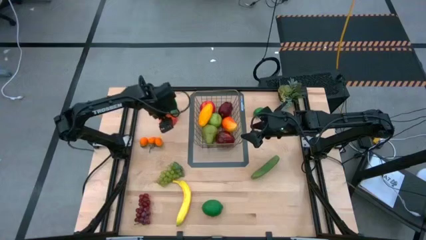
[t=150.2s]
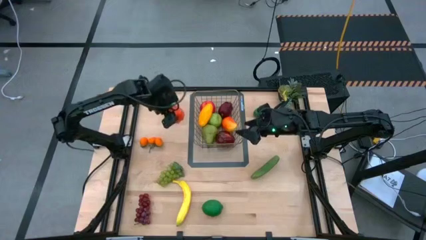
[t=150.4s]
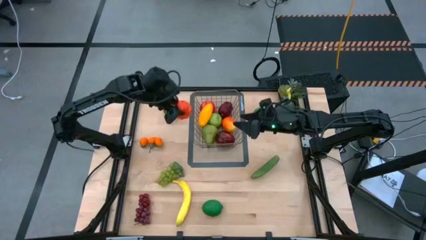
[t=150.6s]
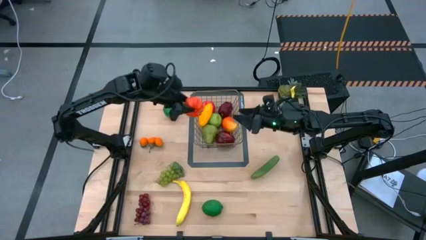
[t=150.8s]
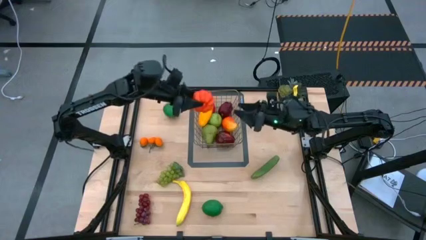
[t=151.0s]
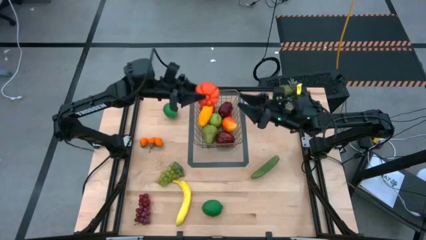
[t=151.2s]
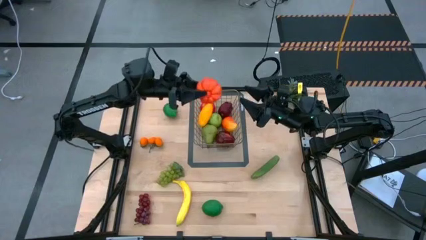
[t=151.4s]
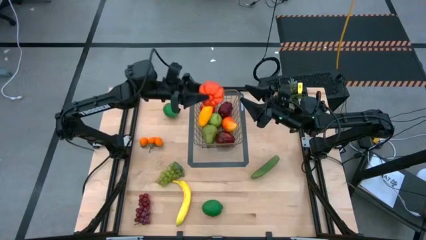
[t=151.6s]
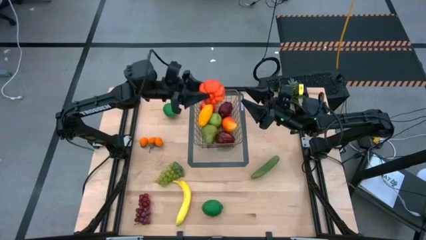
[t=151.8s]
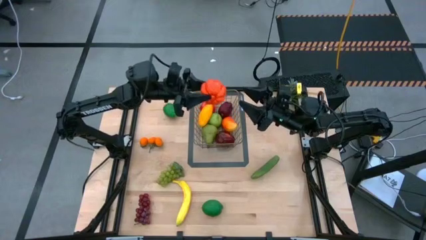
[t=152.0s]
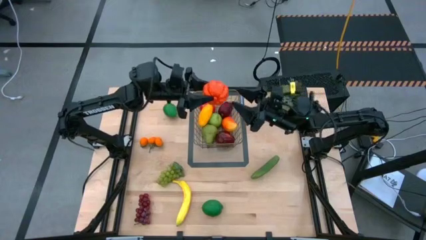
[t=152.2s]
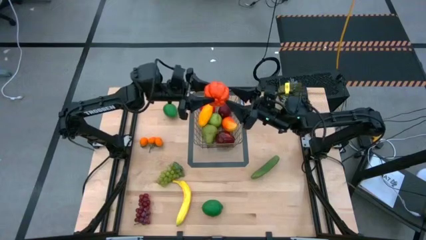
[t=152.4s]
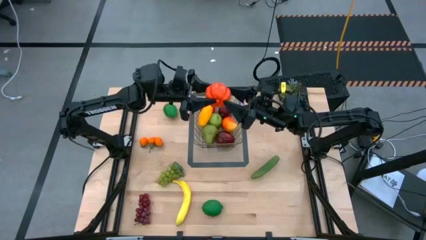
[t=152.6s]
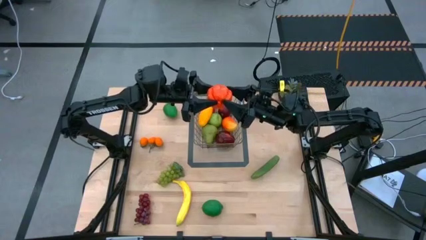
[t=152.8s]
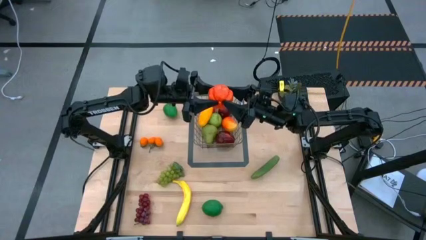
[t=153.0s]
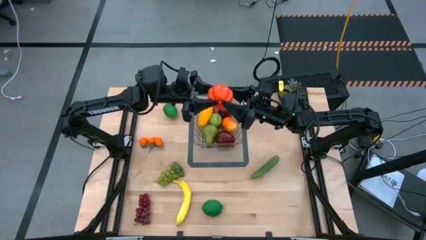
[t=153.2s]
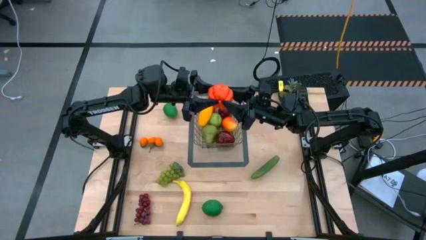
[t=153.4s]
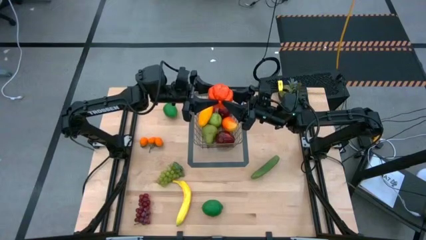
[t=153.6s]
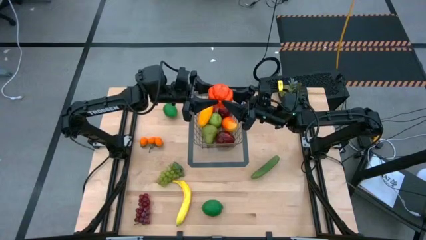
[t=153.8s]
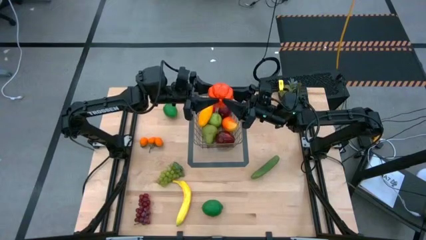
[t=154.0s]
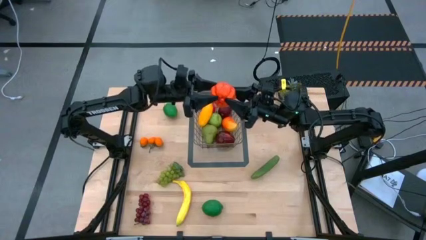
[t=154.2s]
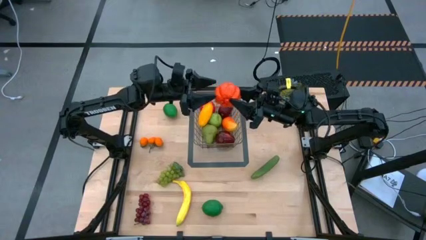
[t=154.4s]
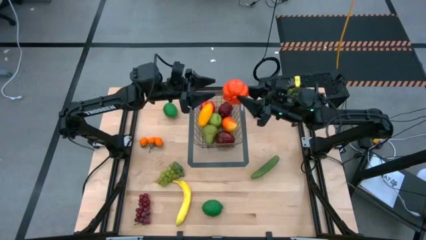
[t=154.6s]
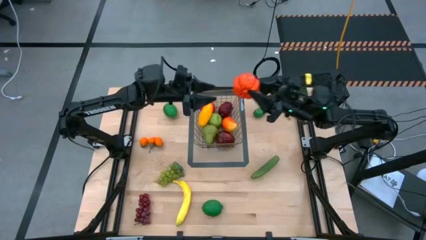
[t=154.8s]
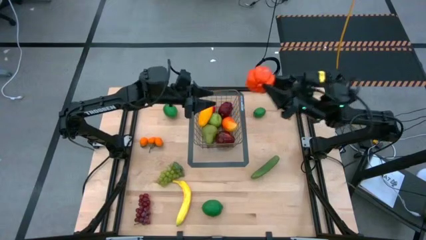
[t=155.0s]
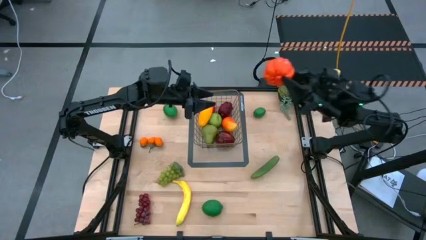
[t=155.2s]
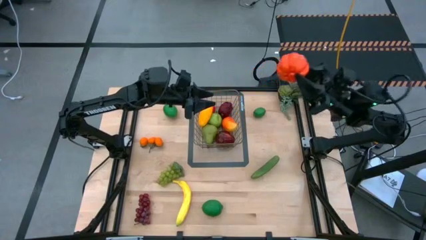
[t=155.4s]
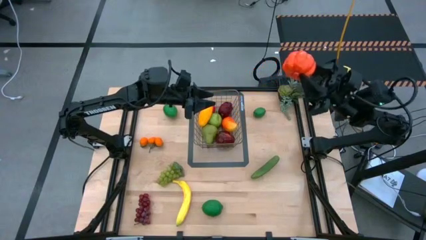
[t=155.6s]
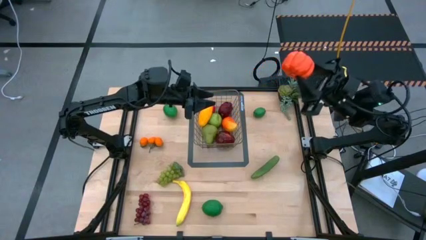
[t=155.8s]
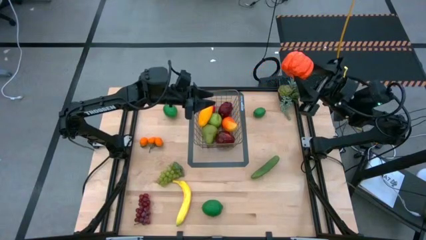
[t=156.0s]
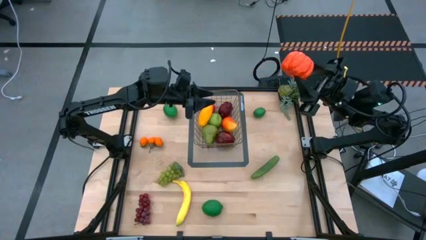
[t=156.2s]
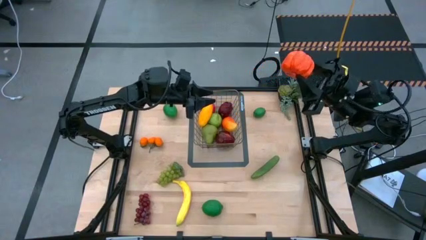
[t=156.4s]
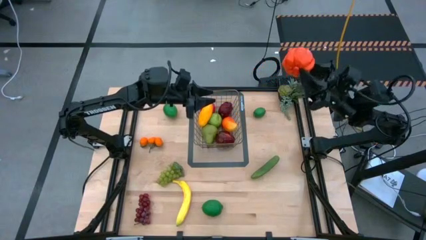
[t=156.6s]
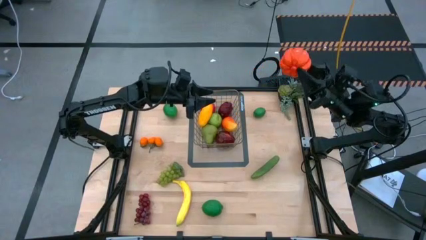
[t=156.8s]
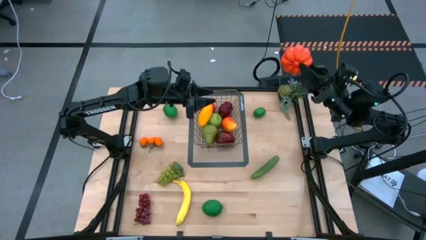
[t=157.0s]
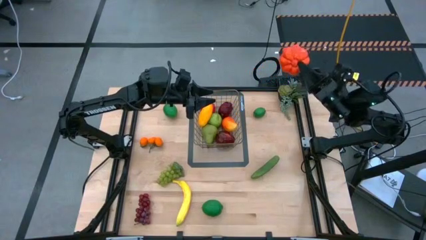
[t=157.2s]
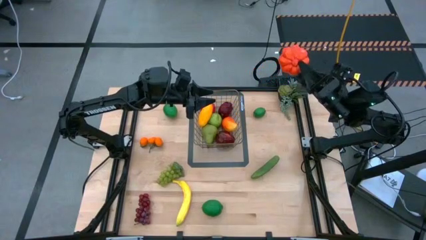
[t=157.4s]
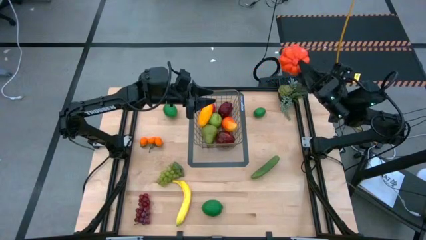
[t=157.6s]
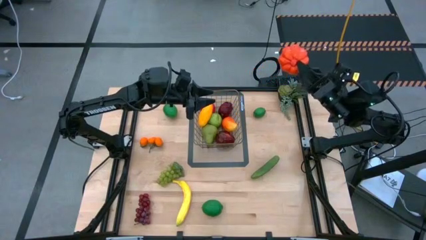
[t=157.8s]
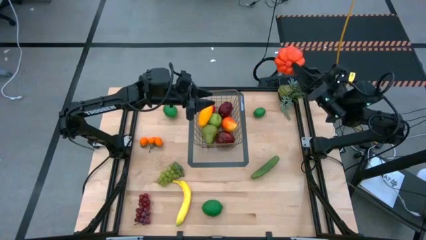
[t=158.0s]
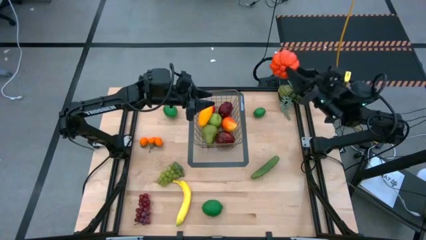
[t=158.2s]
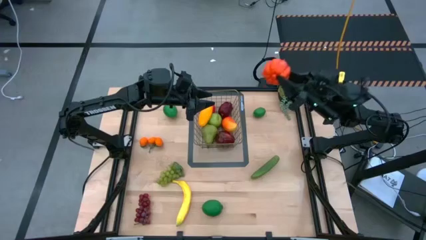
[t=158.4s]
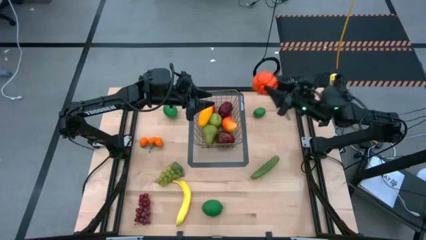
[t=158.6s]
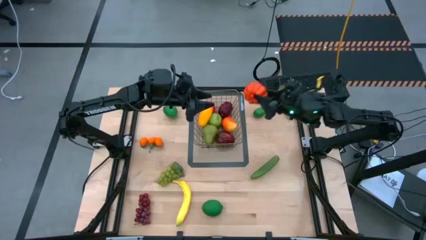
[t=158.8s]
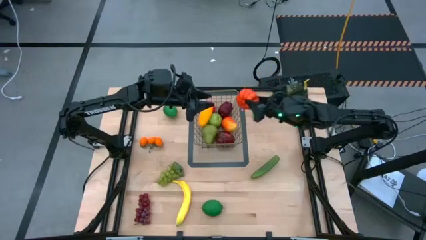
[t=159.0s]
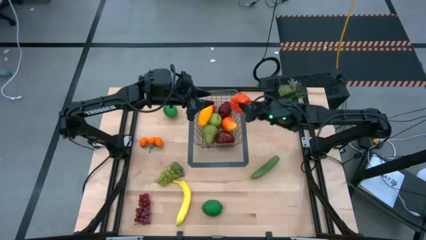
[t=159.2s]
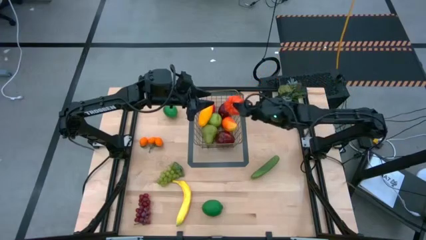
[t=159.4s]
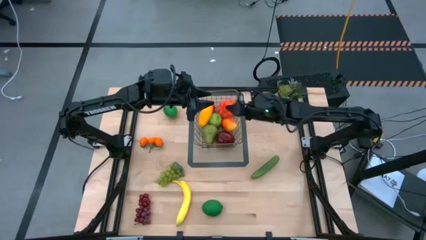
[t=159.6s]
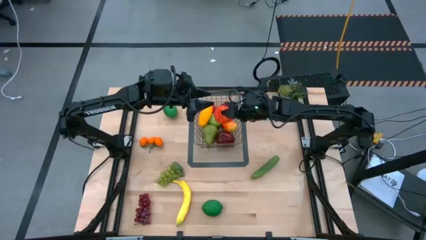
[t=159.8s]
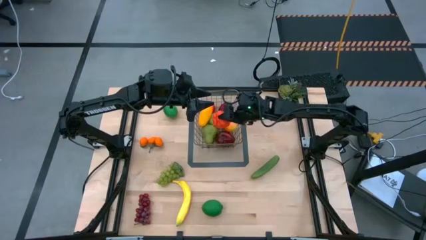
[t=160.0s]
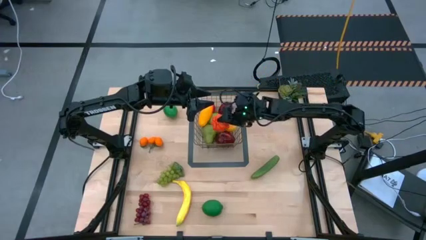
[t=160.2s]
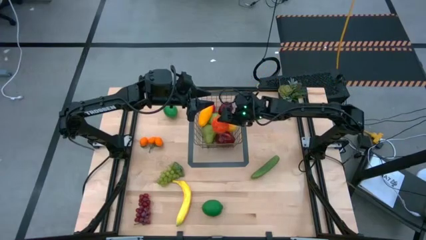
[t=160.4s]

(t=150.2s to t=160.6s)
Task: Build produce basket
Put the orange pumpkin into the gold wire basket

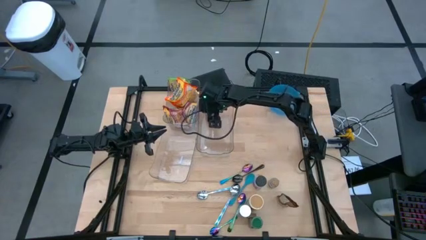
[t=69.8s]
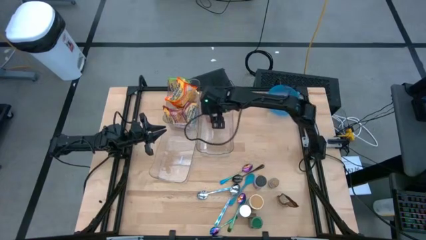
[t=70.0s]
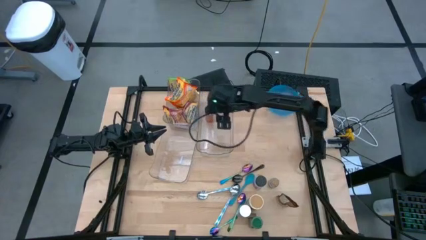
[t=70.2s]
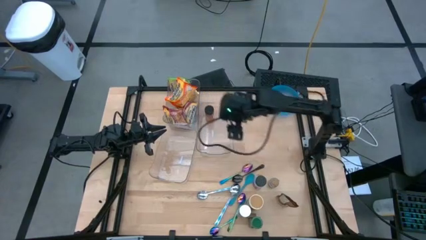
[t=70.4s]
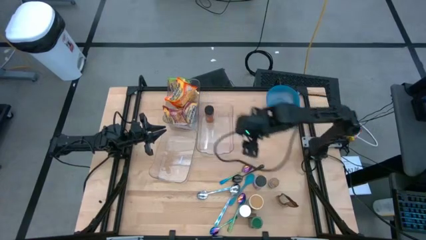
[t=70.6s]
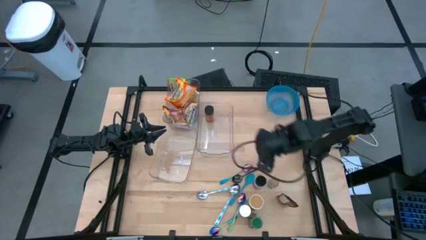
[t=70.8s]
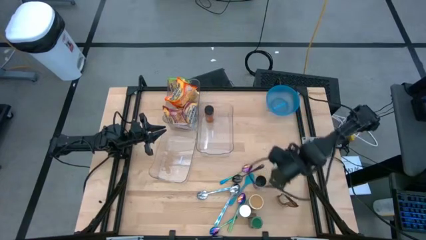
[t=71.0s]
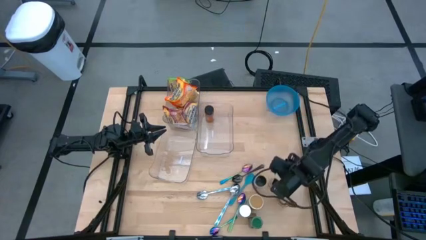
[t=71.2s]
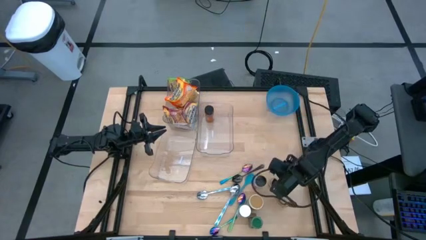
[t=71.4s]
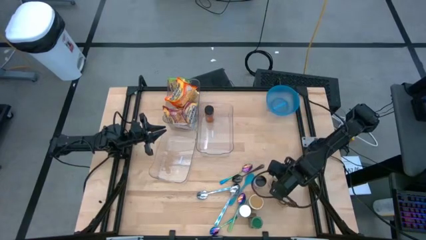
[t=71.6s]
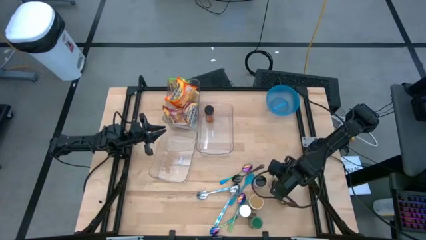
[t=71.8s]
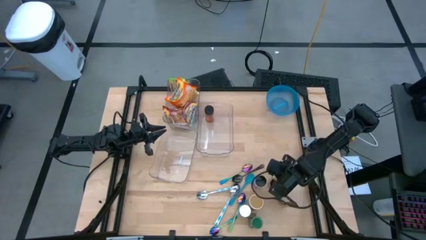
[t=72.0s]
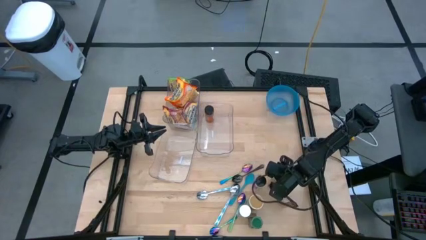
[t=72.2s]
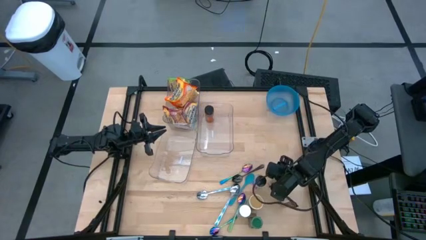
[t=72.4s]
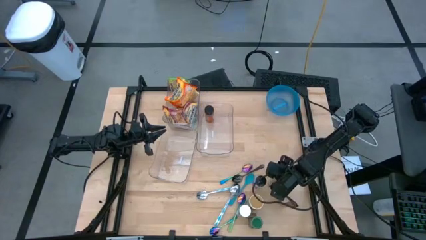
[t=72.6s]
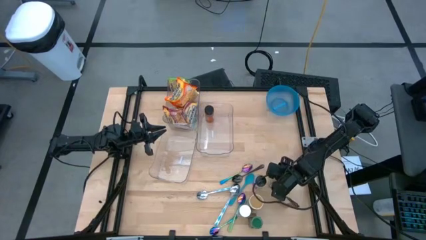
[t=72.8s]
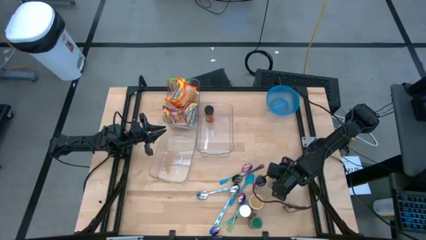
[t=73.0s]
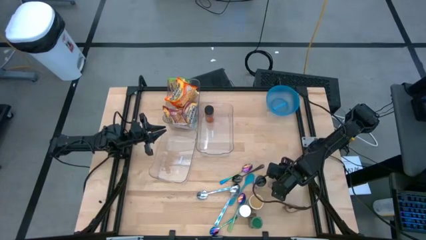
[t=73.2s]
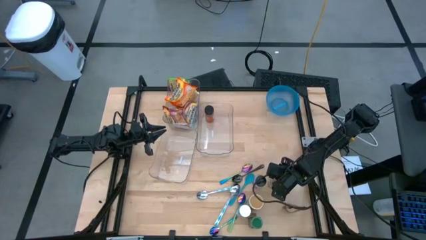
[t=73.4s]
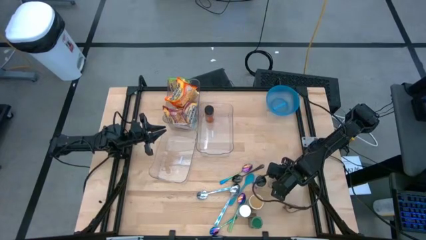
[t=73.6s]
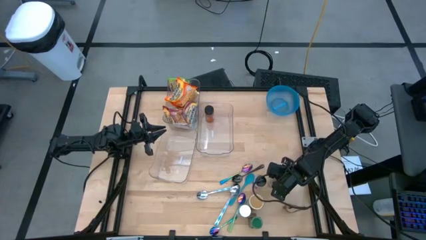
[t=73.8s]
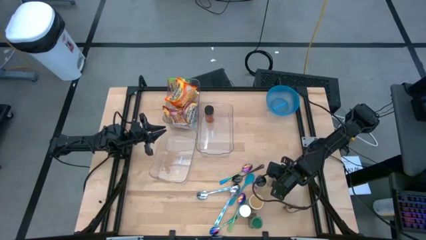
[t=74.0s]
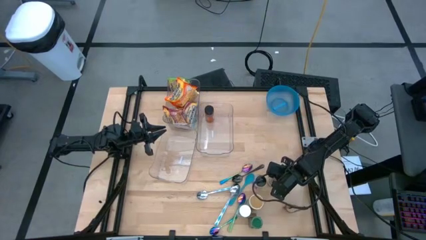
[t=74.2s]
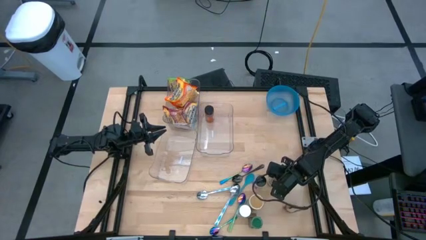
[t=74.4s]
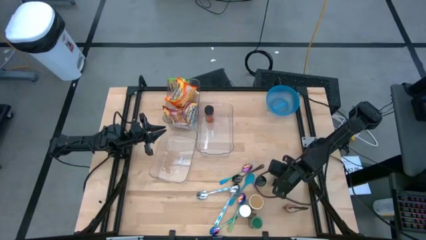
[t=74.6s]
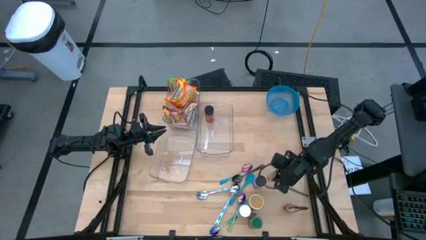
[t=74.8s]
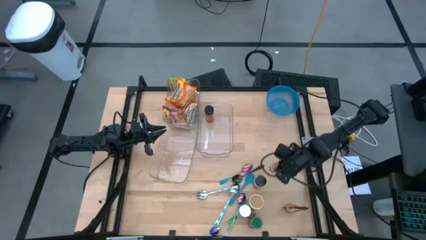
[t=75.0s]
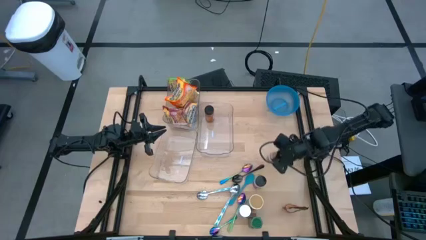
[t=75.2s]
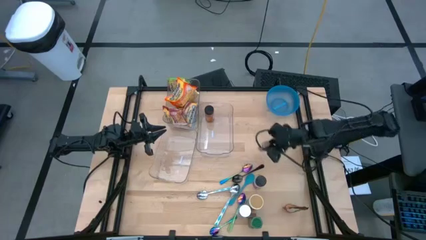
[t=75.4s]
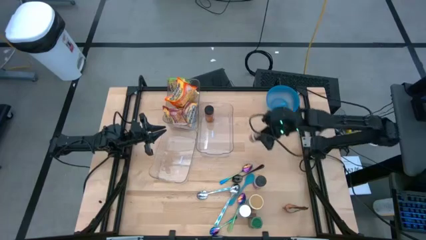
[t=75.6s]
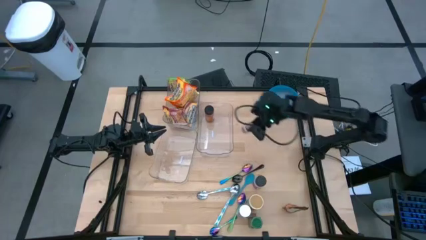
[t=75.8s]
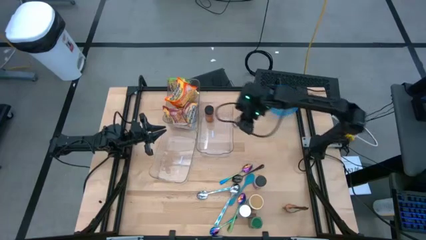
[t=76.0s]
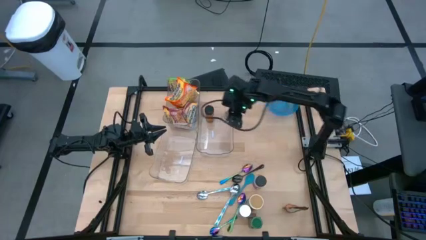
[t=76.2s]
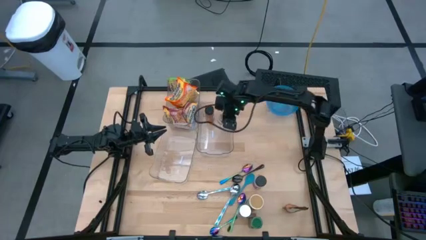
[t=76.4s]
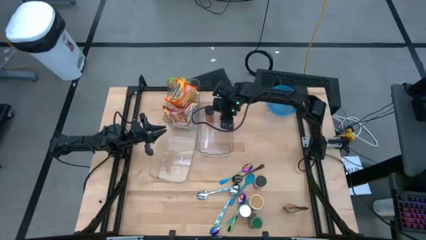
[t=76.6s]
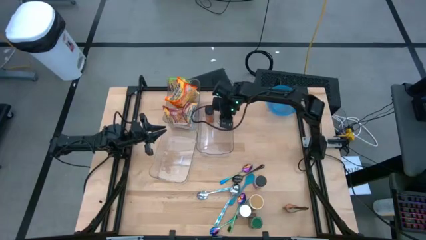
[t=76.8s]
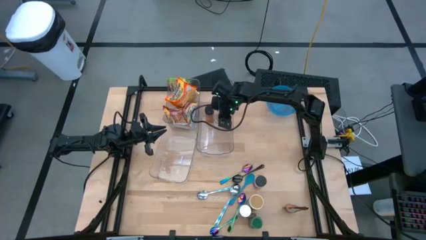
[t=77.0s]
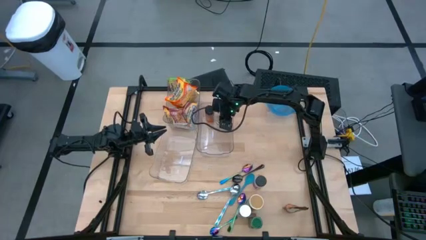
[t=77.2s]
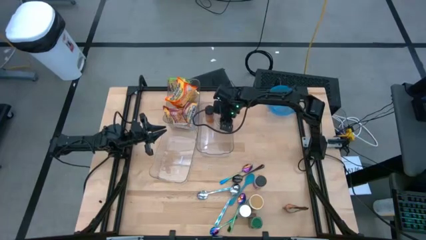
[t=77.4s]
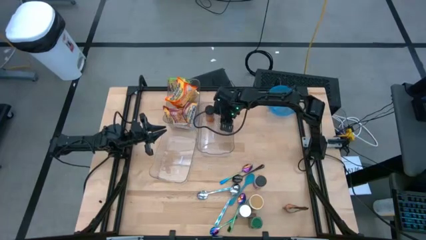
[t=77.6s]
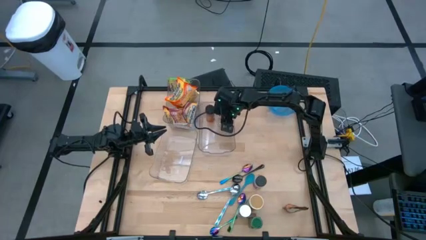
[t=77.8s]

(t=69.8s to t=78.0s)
Task: Pick & Place Food Item
Put the brown spice bottle into the middle transparent bin
